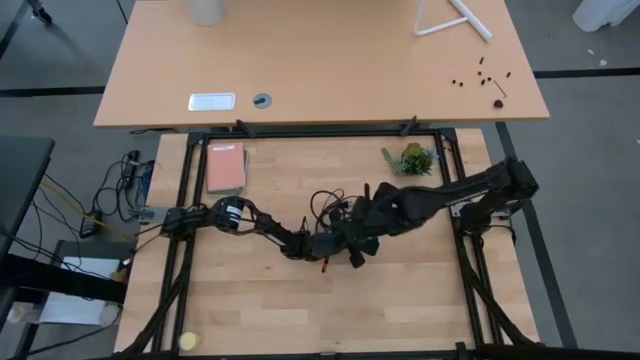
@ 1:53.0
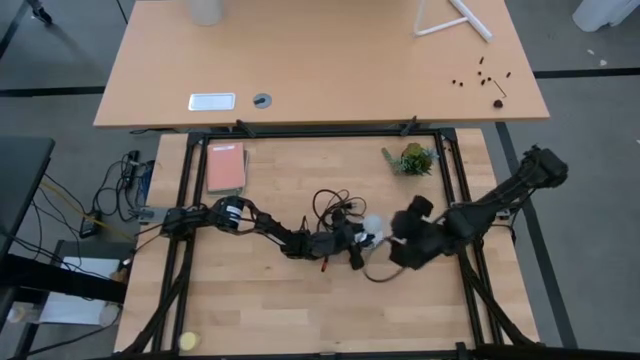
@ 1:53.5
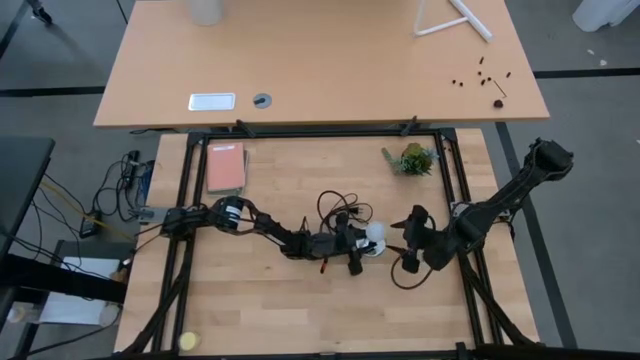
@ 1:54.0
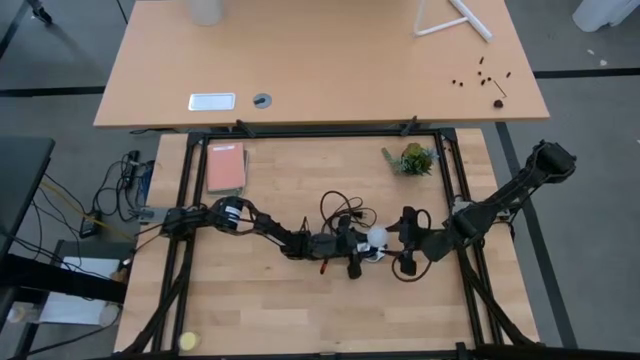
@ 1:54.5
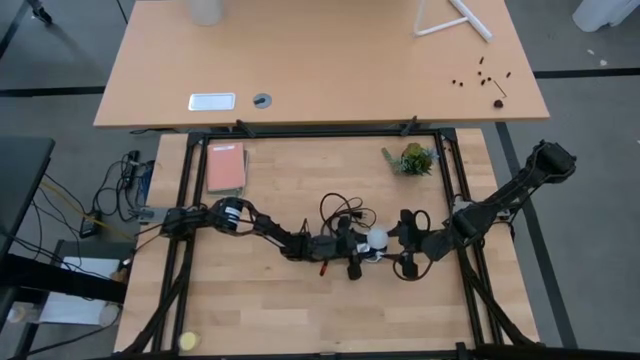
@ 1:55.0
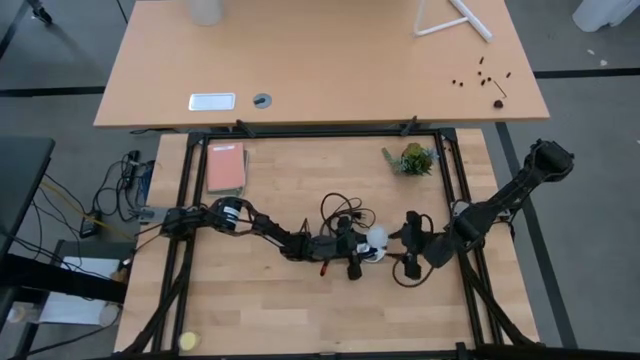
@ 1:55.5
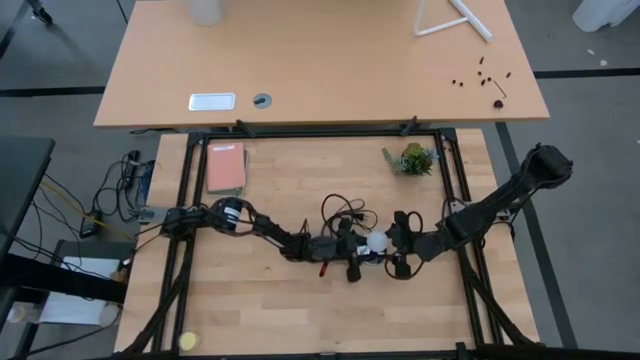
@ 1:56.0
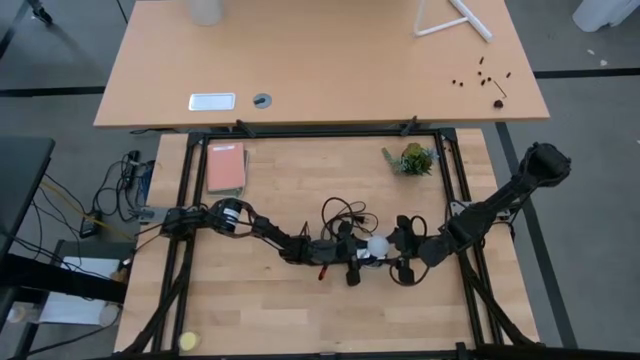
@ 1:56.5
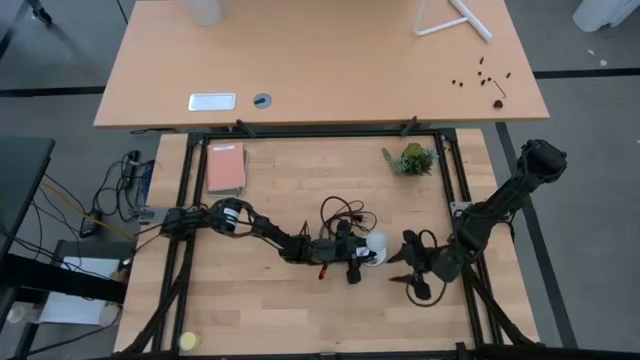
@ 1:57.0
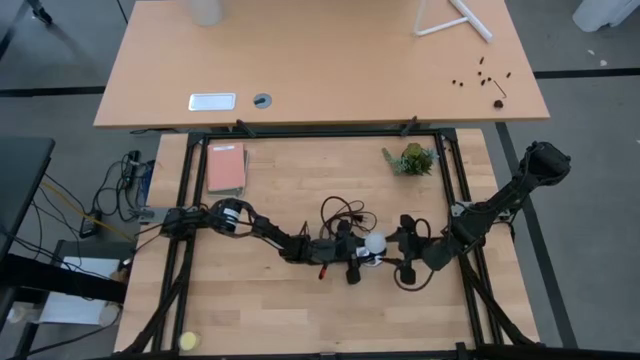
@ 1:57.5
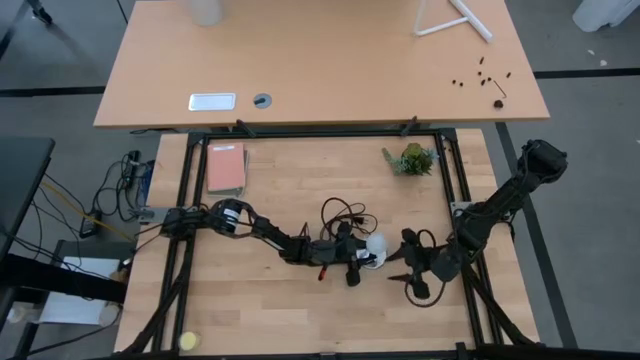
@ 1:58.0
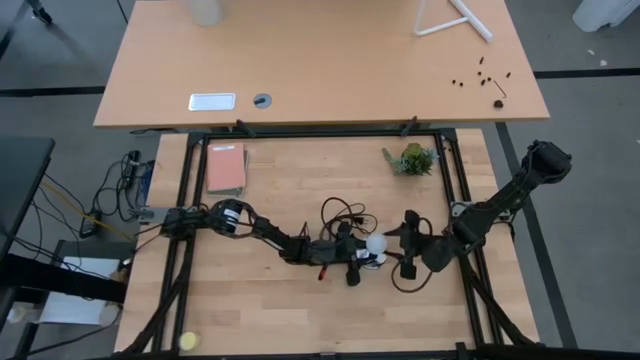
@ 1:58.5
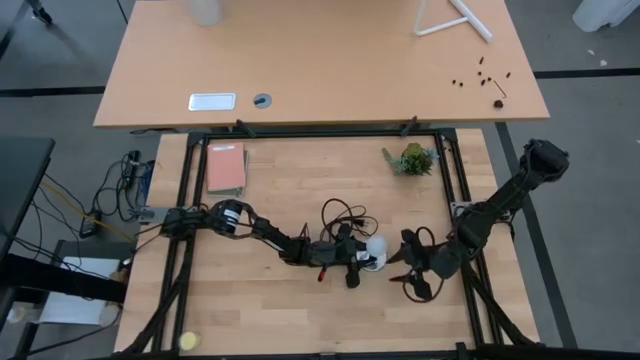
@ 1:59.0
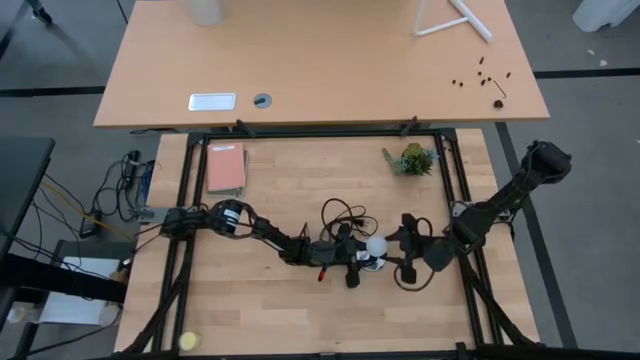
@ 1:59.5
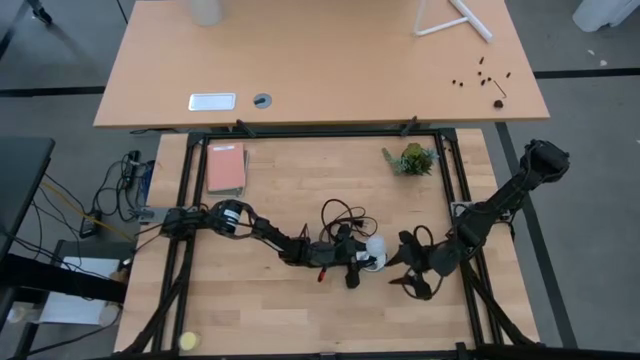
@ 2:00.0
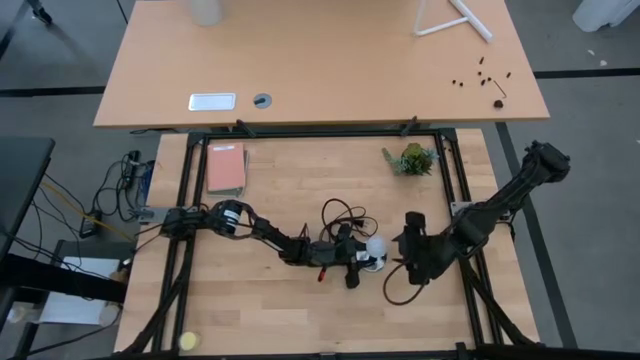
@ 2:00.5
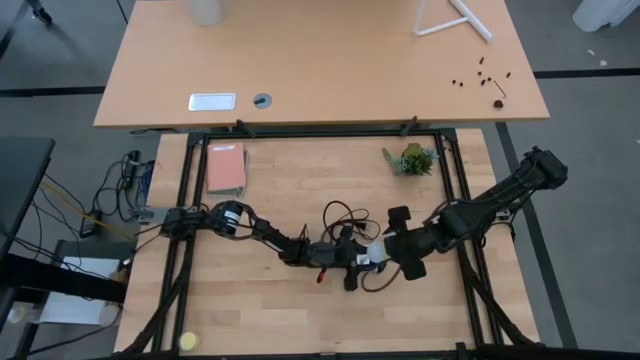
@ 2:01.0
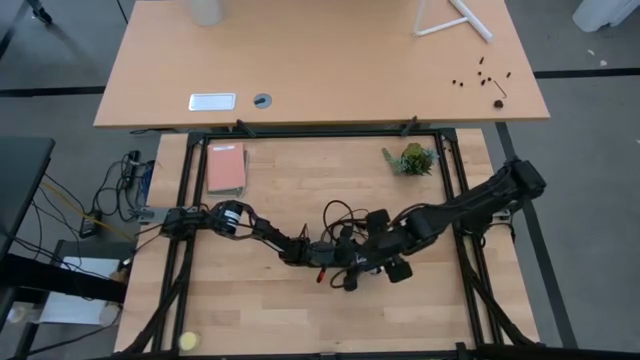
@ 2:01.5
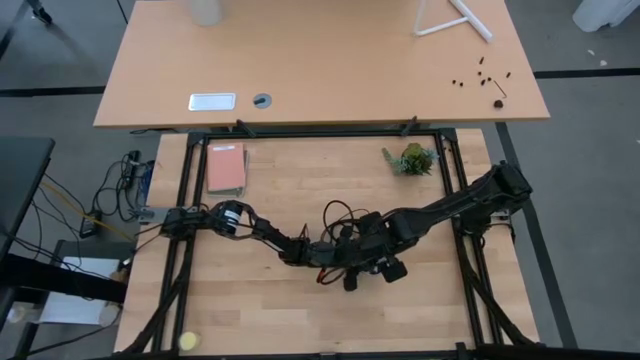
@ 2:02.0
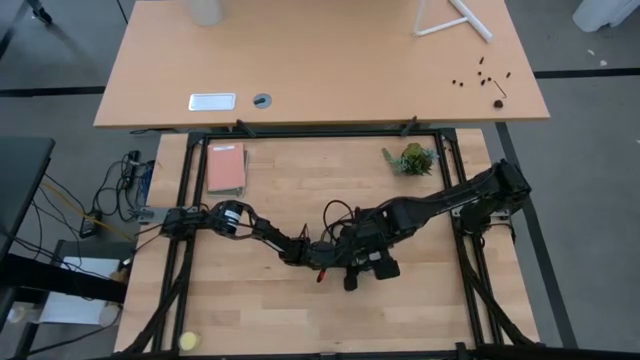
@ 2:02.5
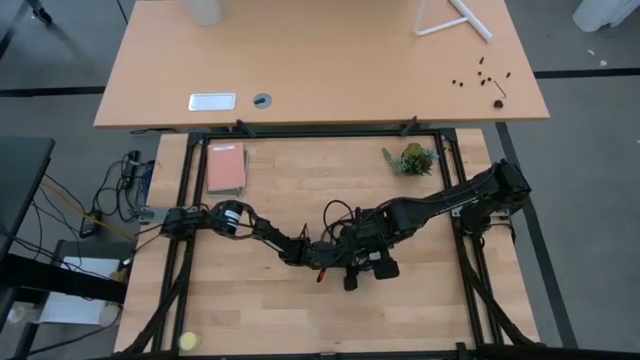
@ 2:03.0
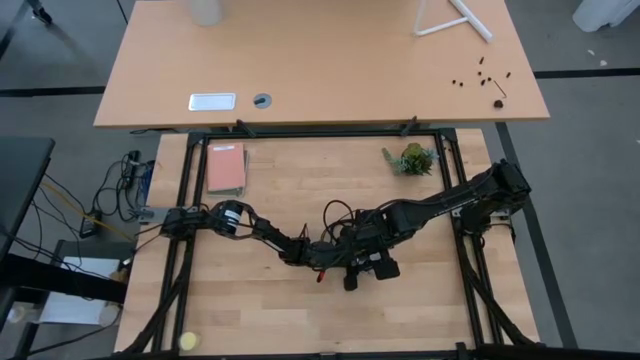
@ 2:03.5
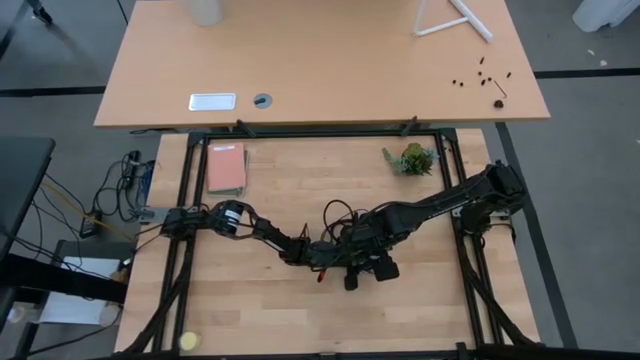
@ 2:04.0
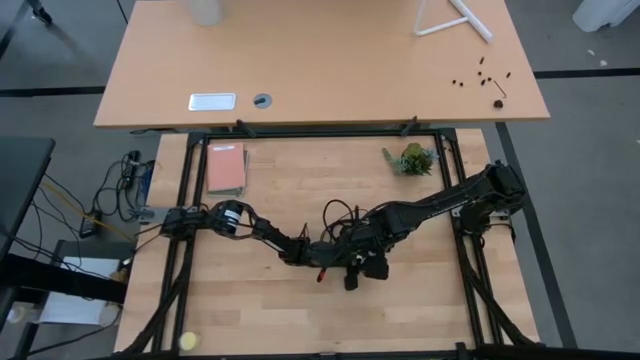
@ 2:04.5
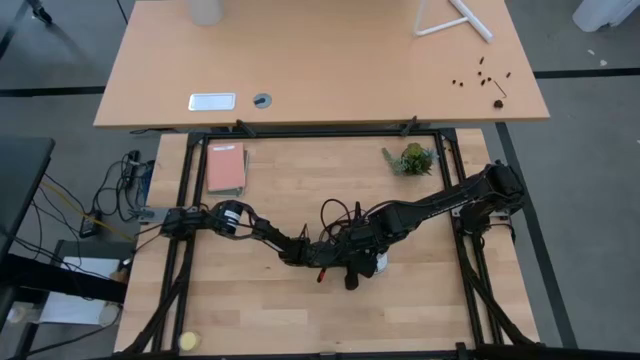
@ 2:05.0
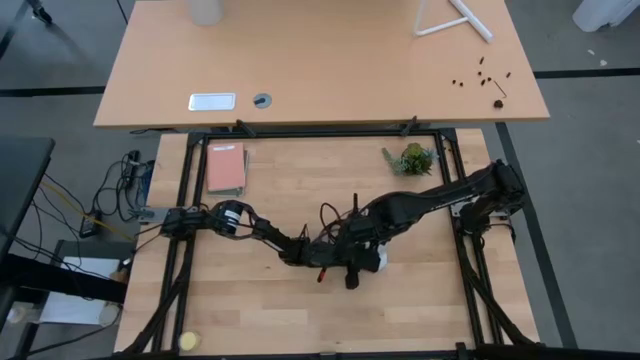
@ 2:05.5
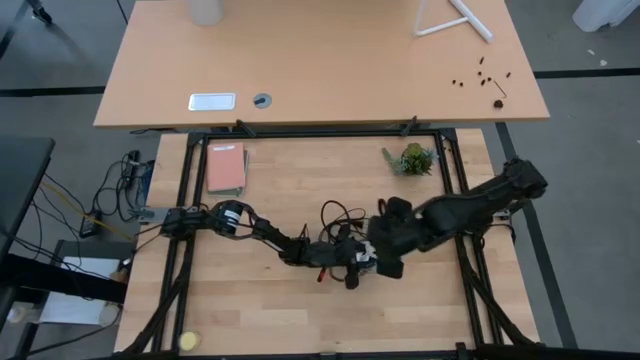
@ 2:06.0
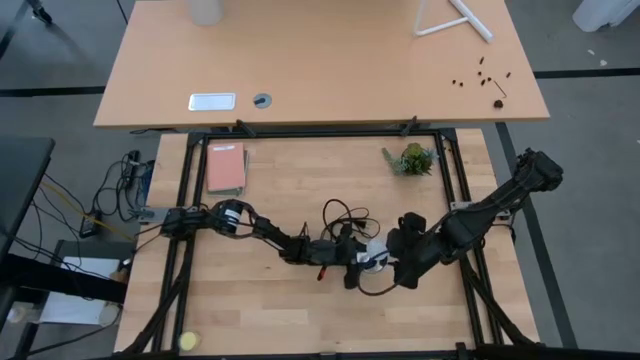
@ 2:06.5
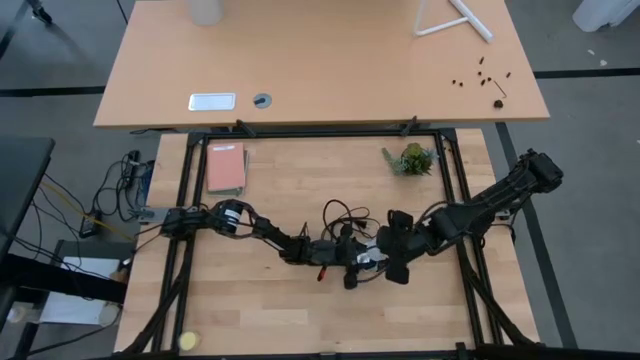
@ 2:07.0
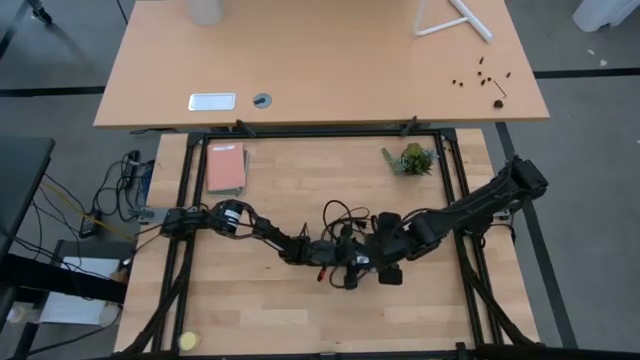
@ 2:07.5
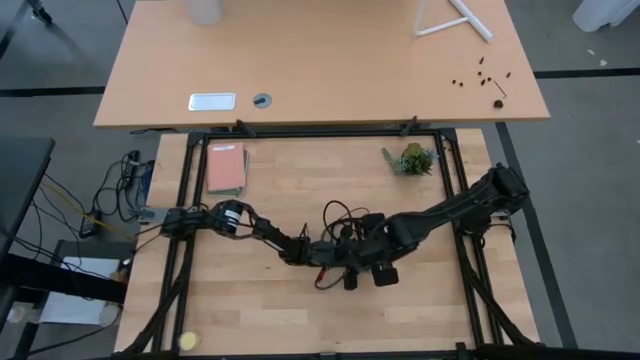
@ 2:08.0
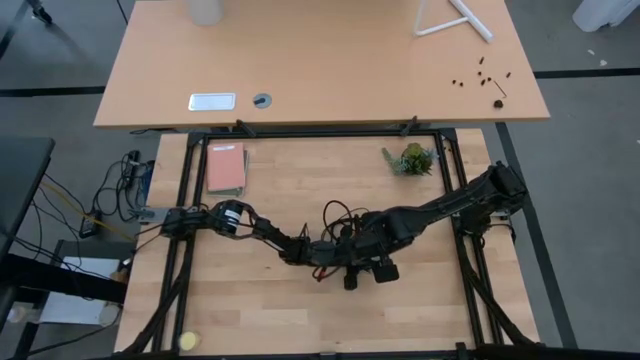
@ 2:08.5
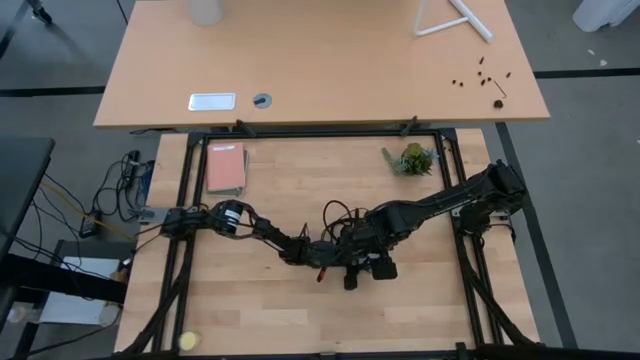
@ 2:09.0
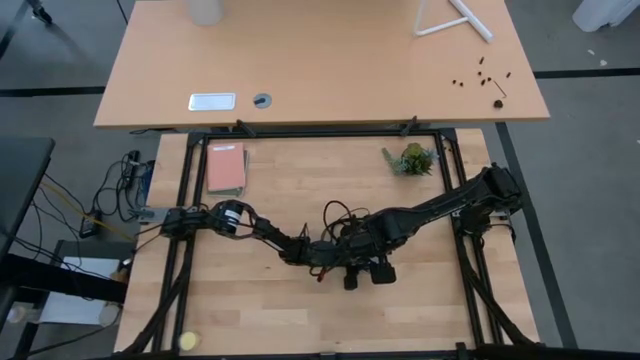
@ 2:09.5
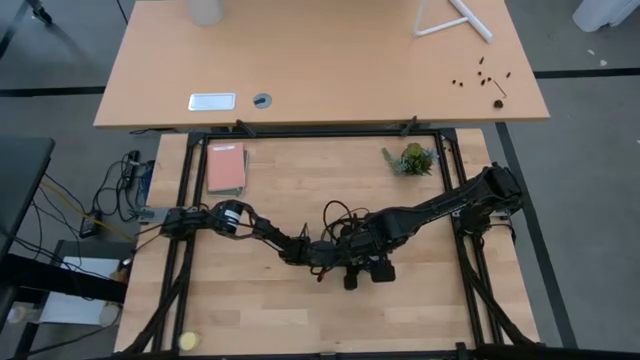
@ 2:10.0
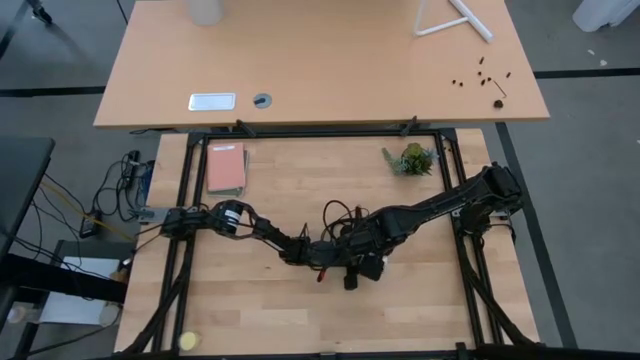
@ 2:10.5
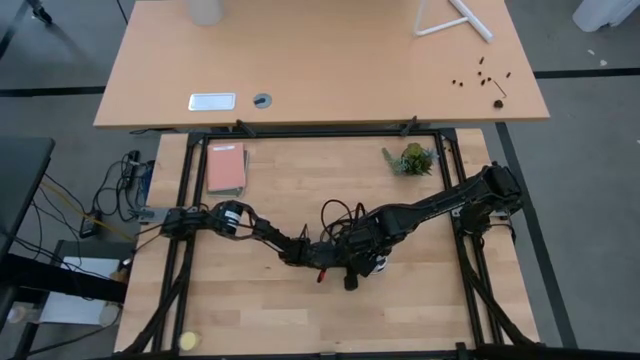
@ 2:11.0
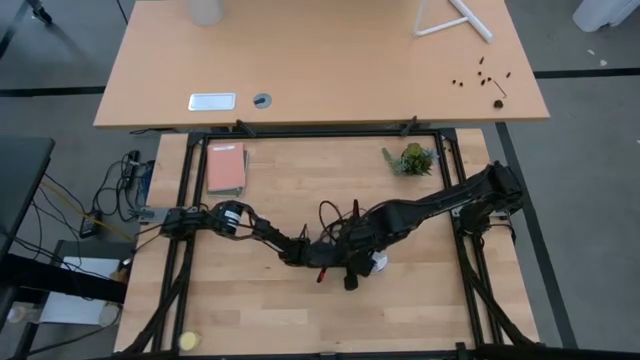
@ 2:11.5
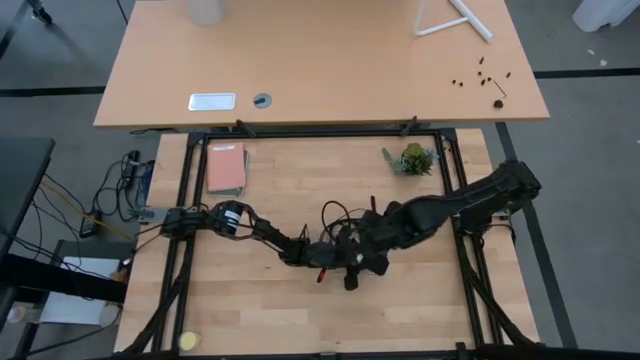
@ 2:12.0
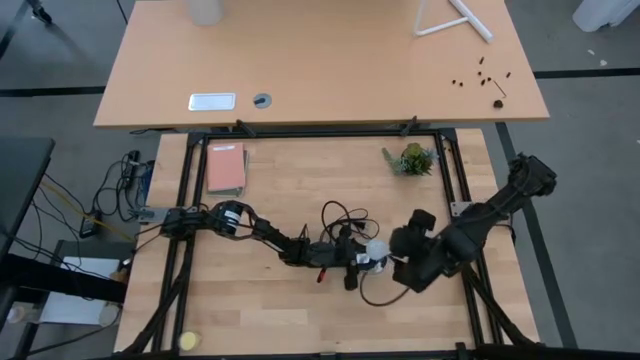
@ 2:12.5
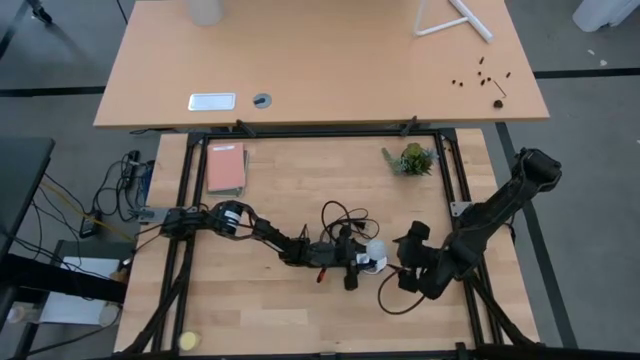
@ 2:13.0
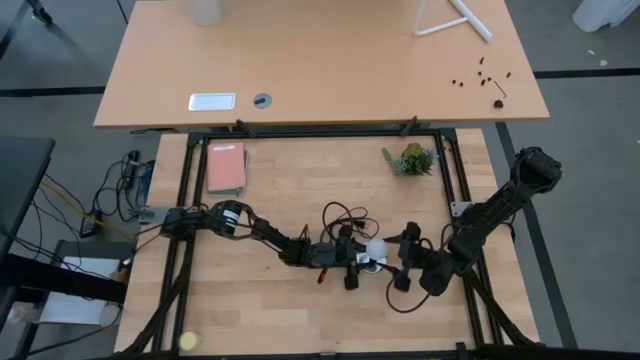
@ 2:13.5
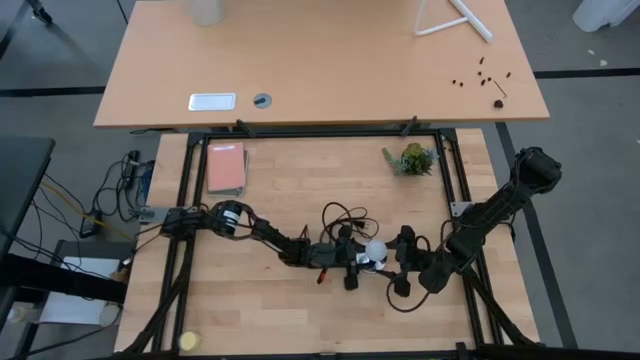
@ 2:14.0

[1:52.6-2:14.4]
Task: Screw lightbulb
Insert the lightbulb into the lamp
